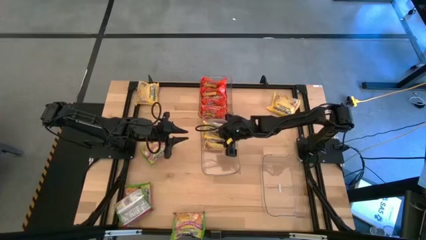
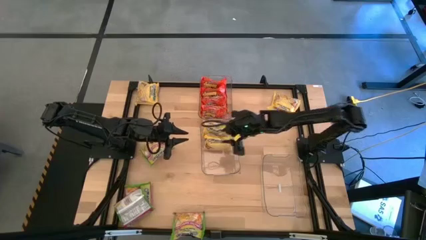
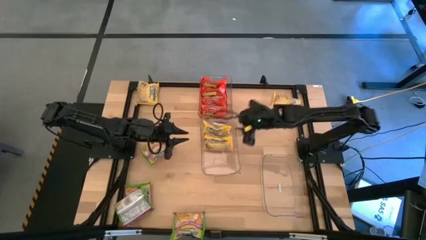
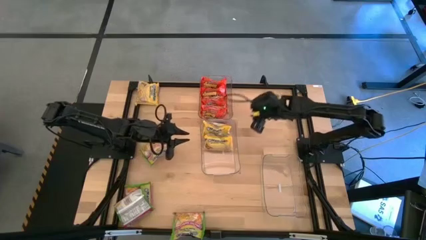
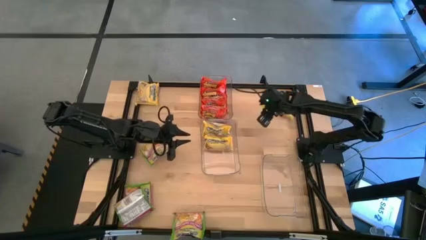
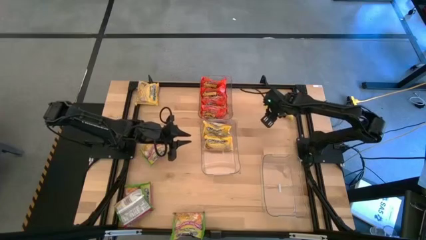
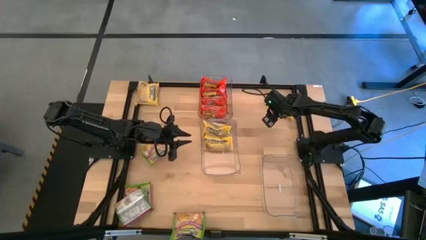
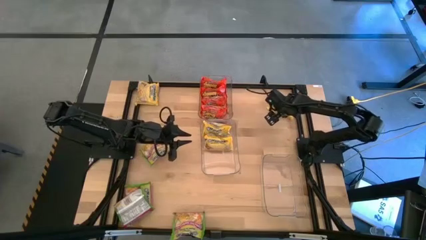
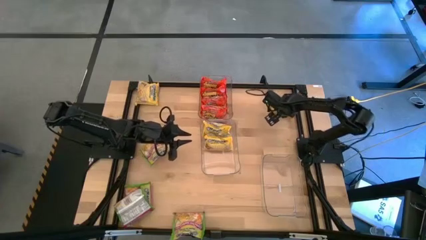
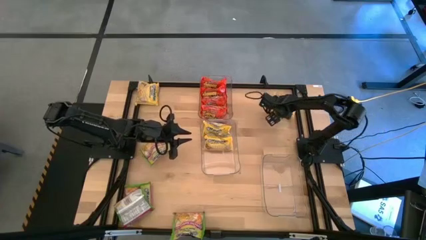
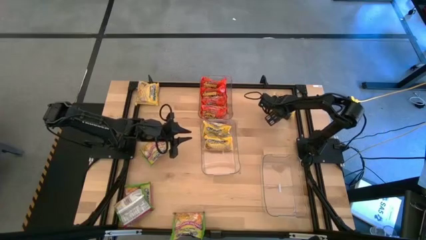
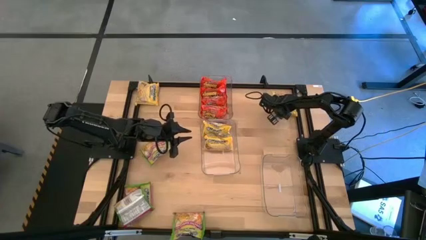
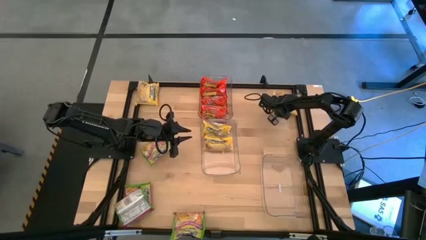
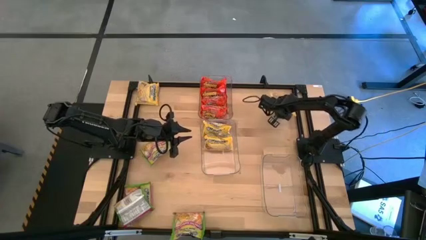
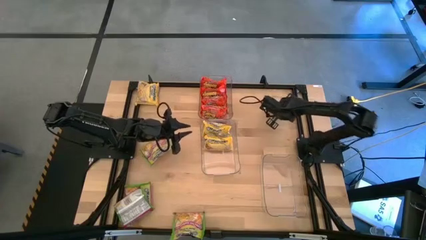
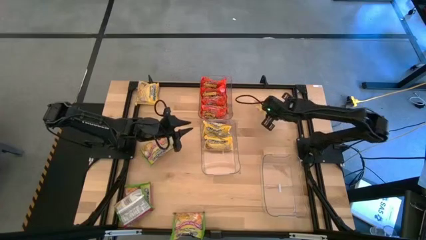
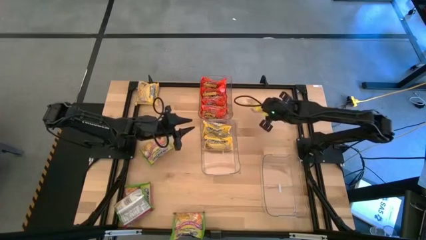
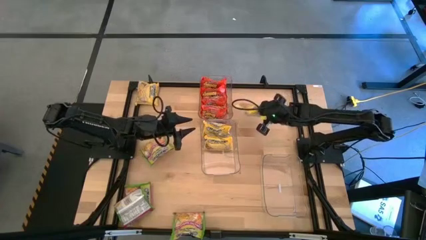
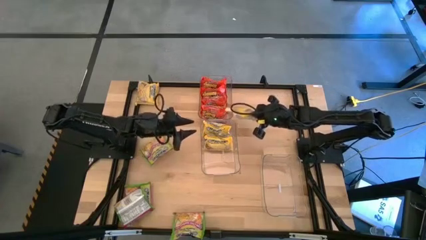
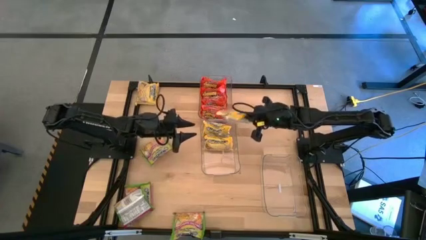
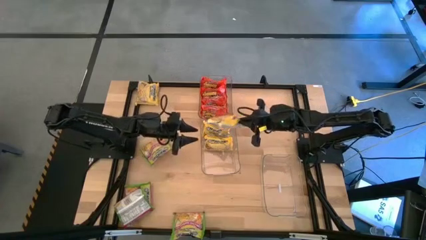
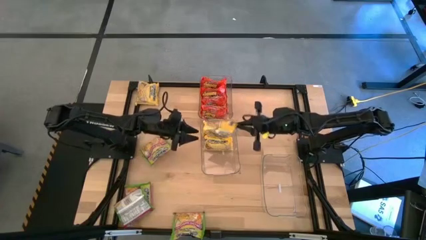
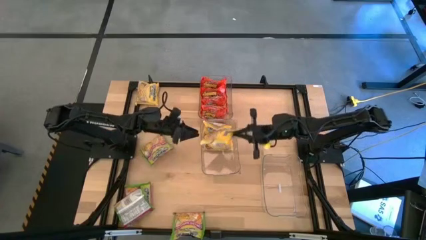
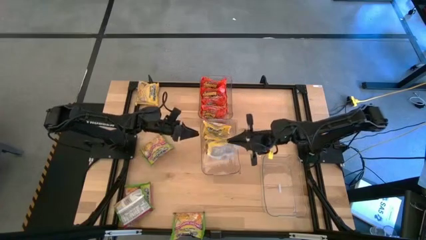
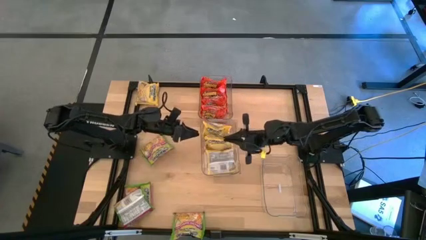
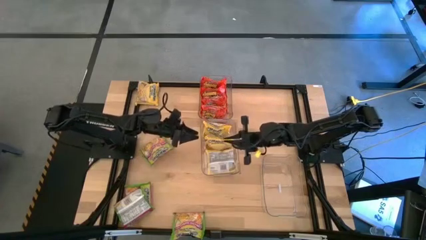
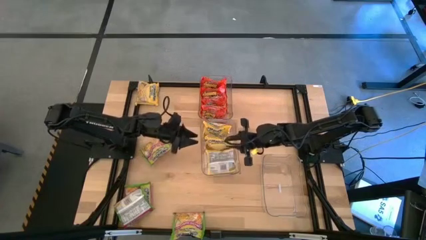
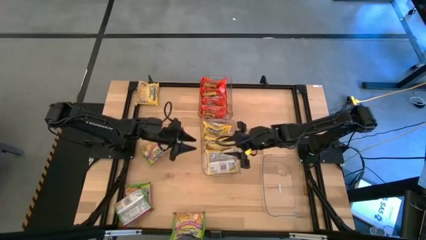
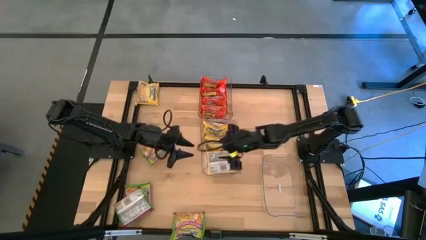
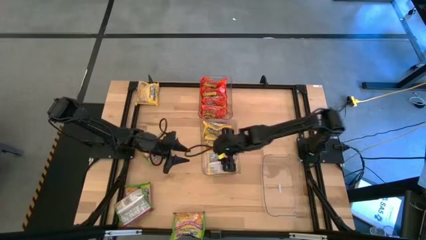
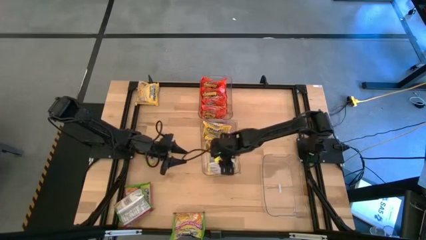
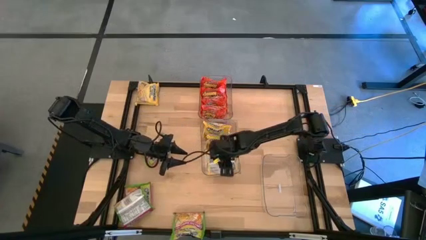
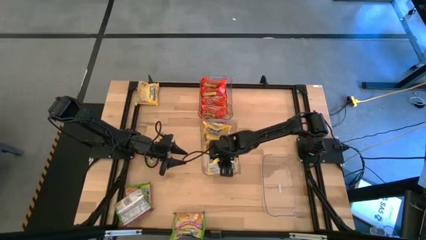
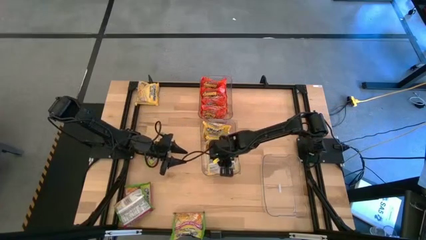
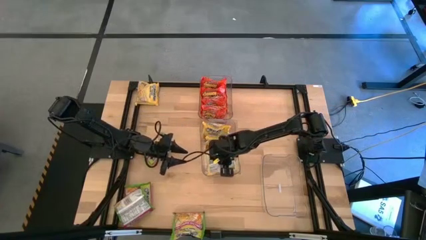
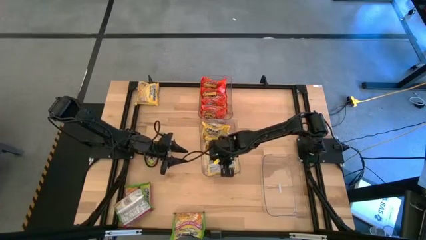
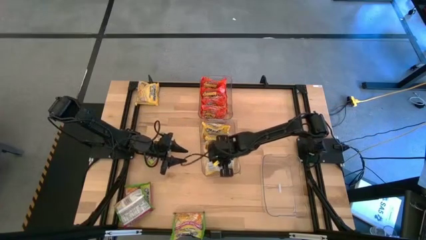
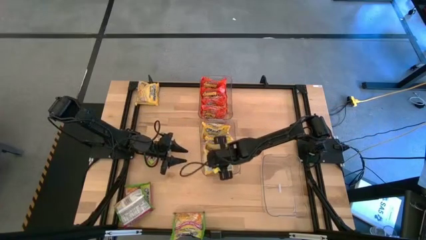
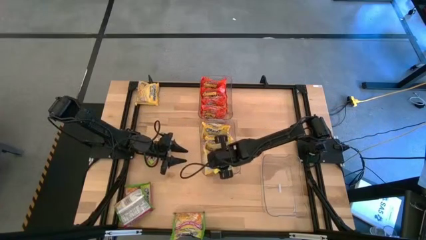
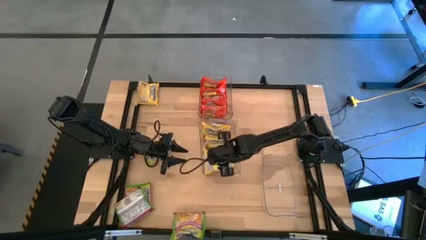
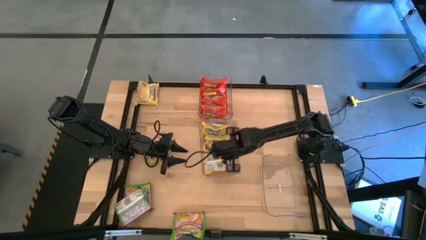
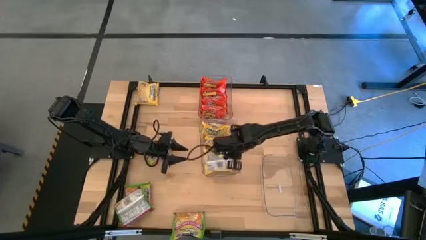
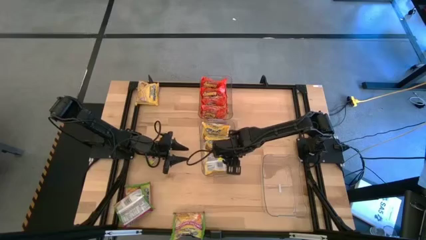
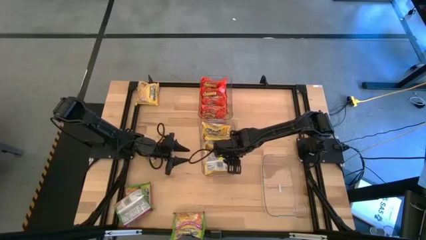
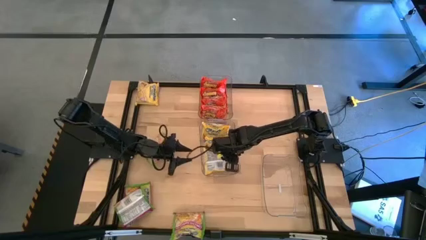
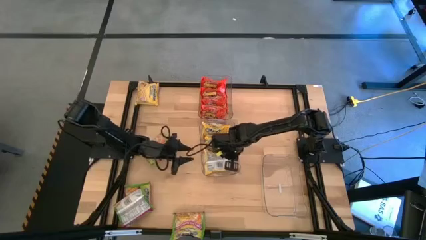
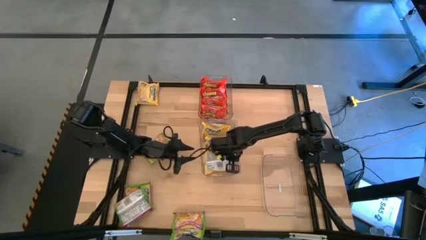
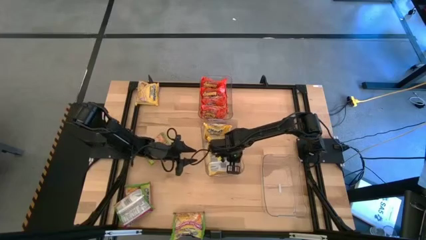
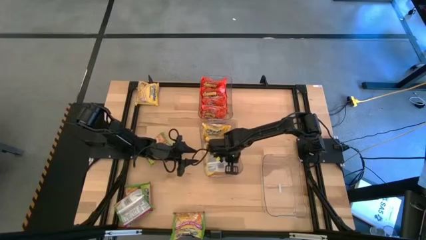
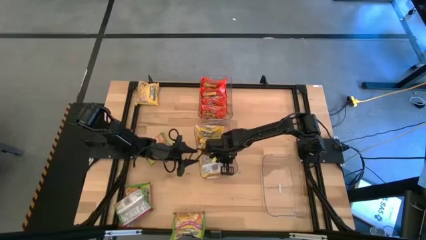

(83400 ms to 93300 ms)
Task: Sort Maruchan noodles
Put the yellow noodle pack into the middle transparent bin

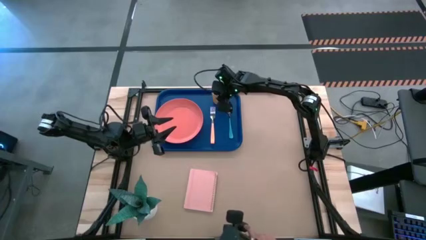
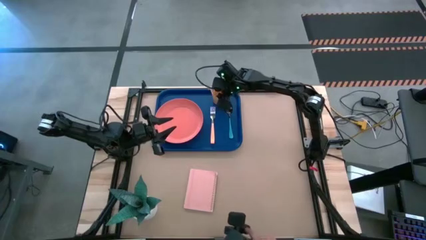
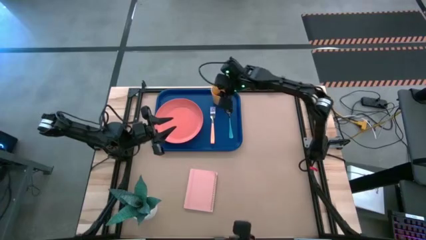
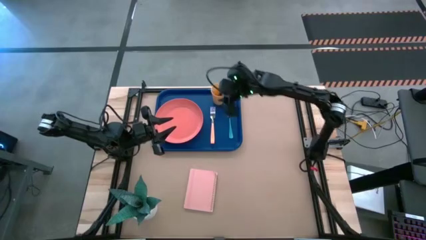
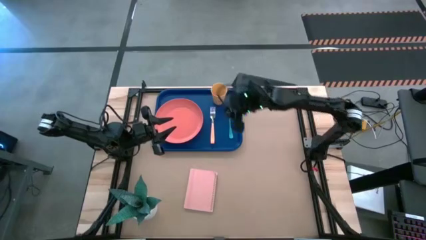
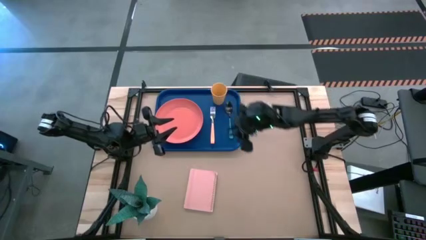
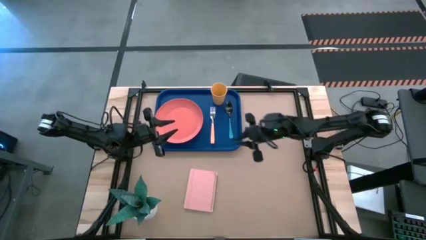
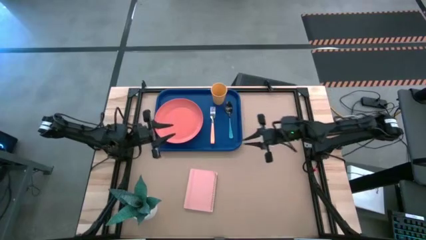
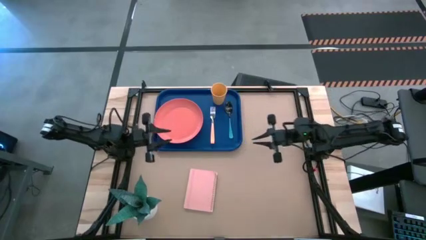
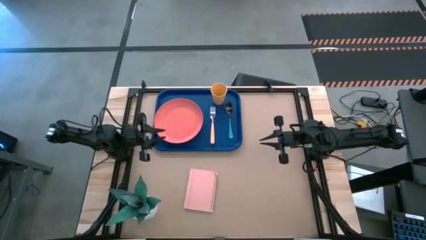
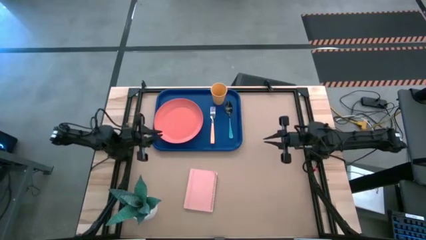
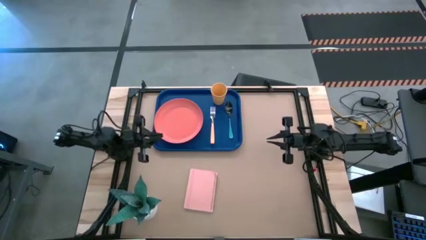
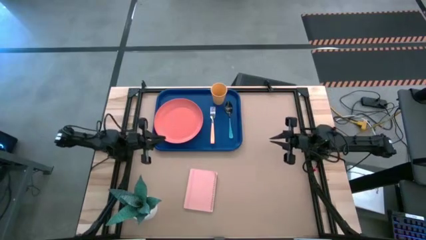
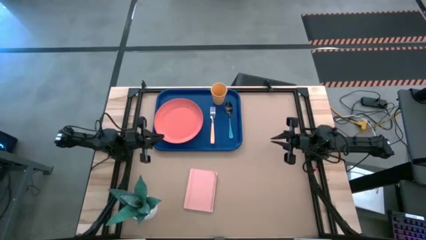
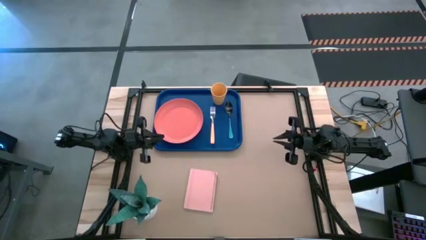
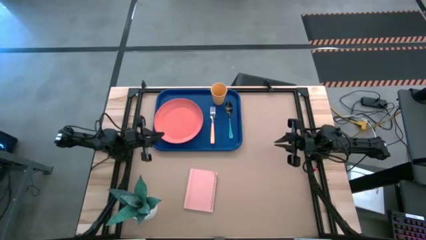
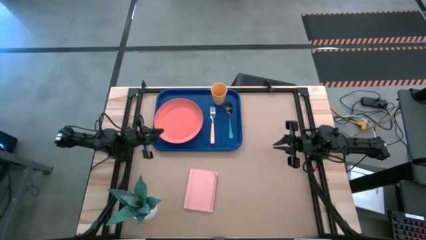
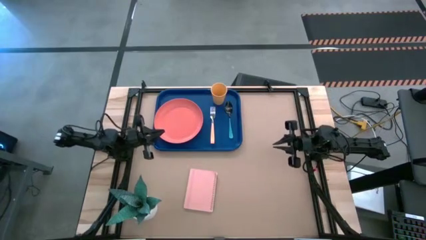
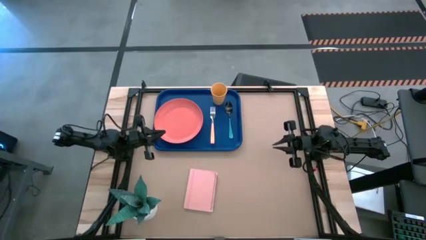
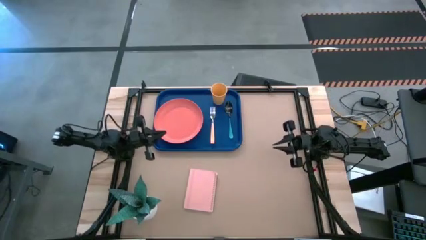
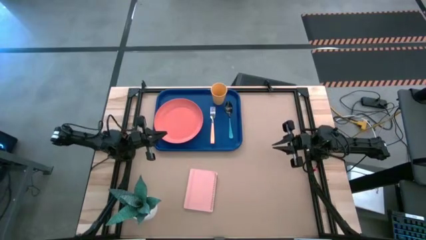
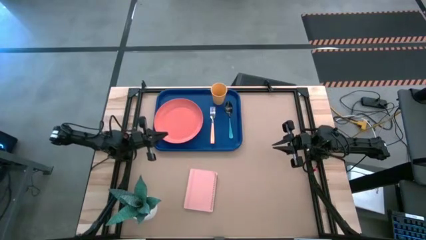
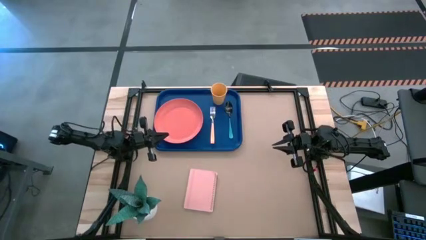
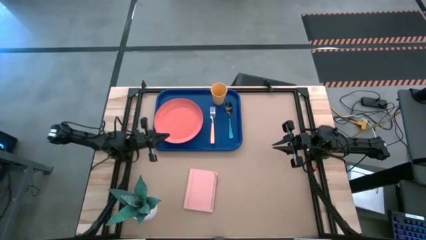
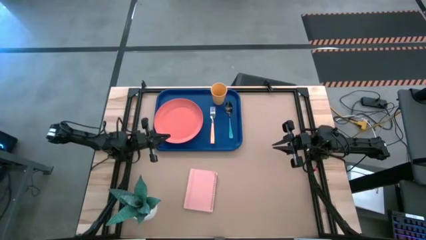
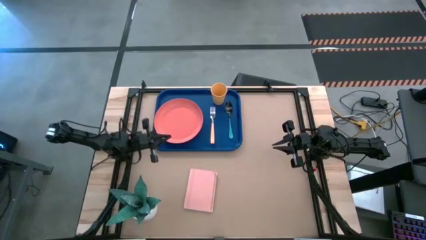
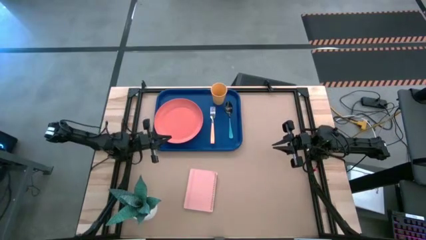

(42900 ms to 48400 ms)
Task: Pick and place plate/cup/fork/spoon on tray
Return to Home Position
